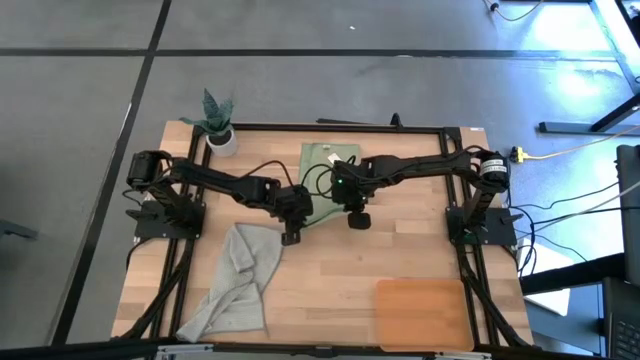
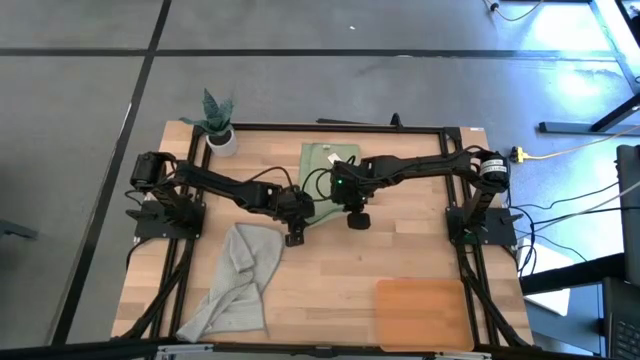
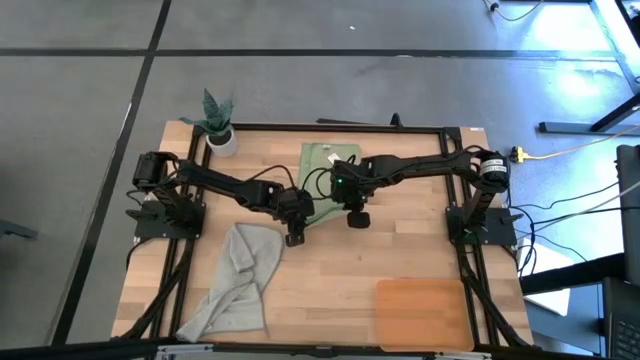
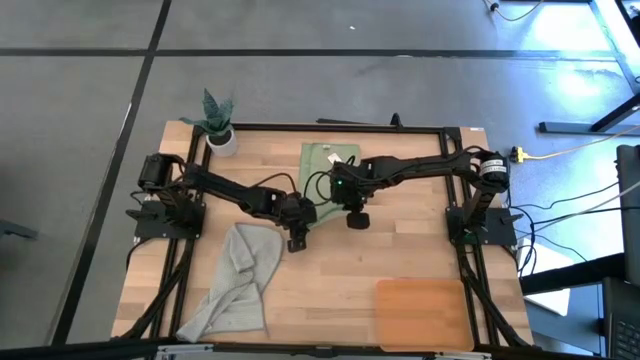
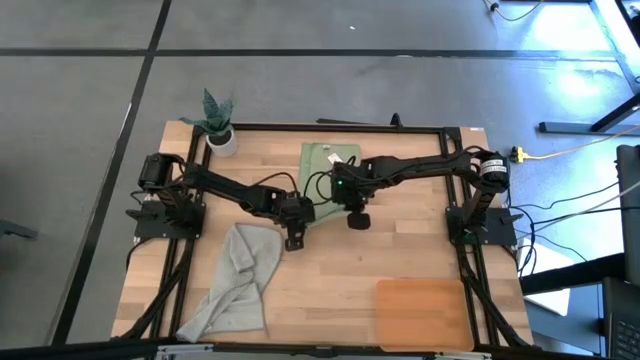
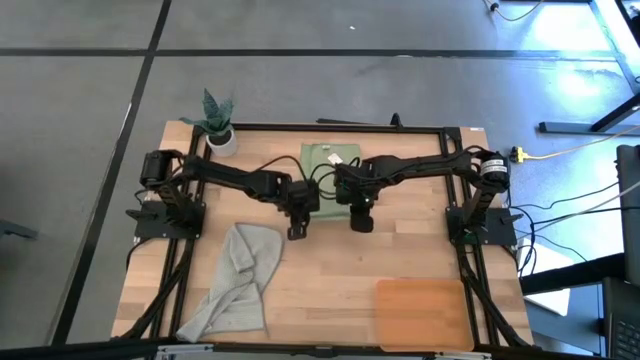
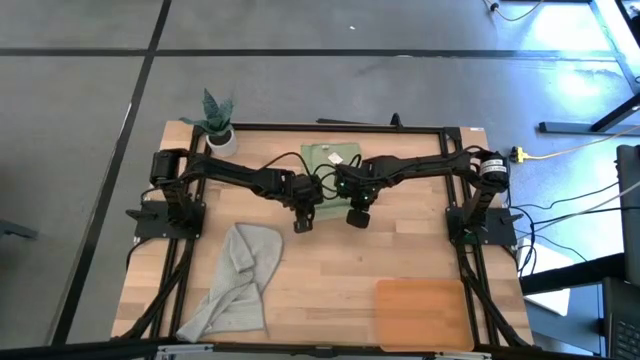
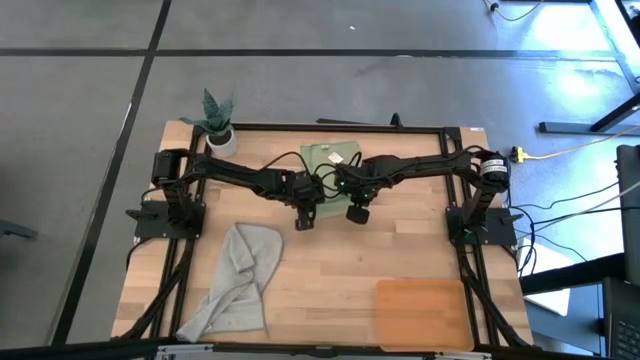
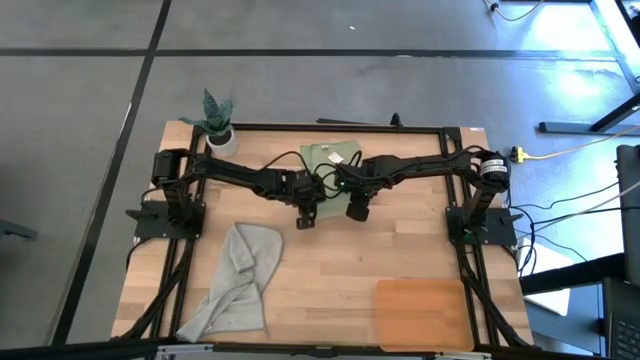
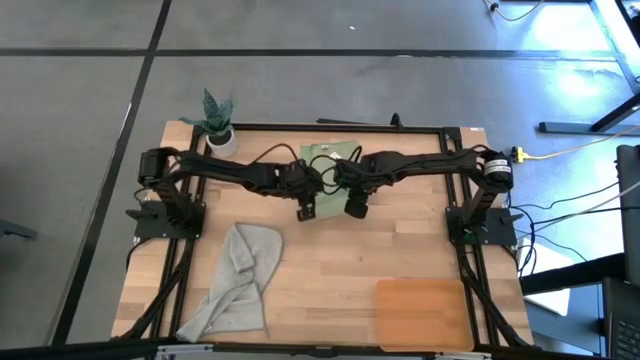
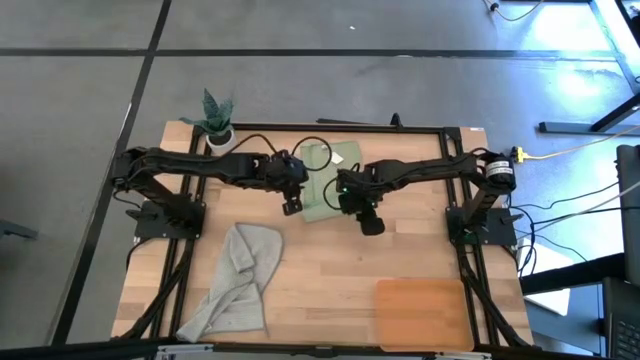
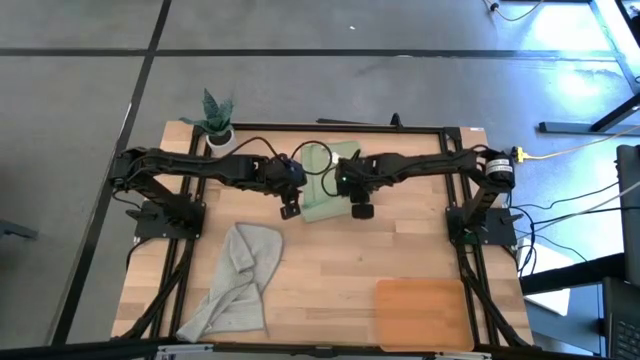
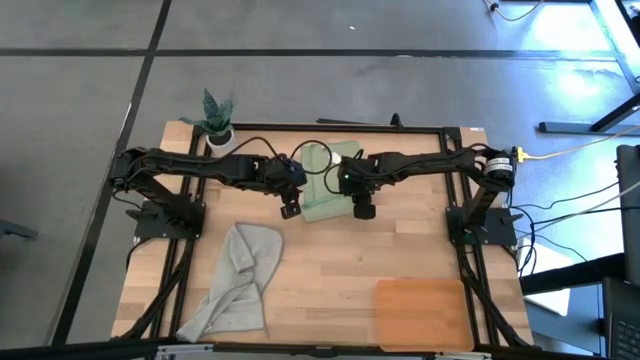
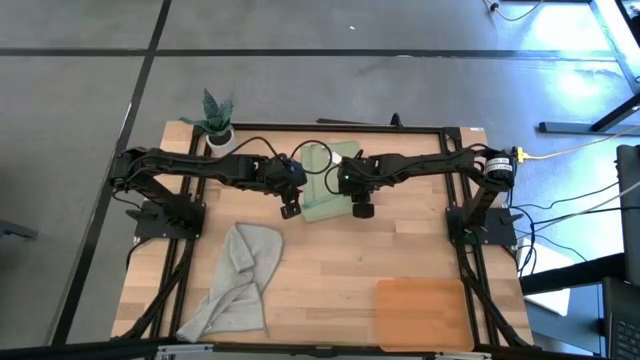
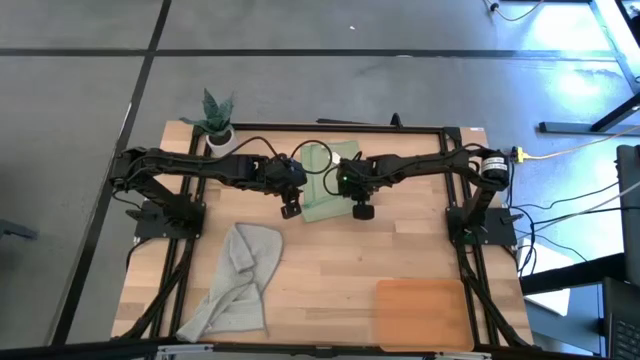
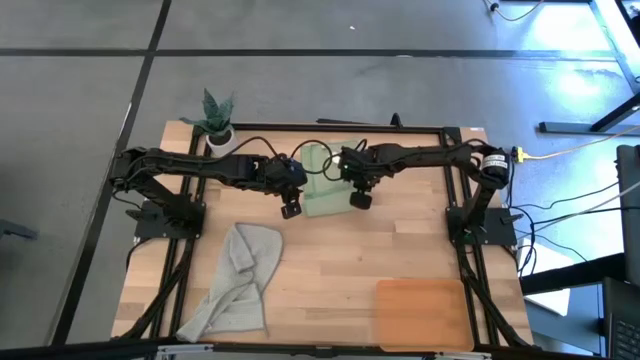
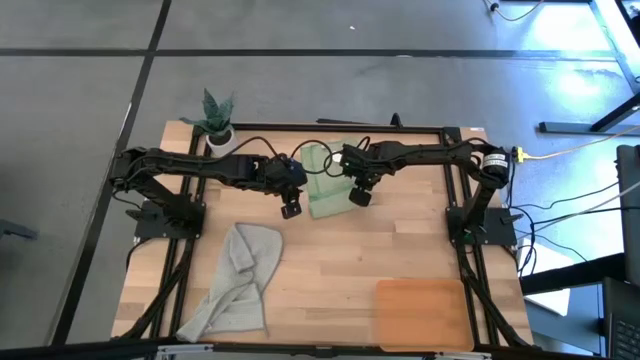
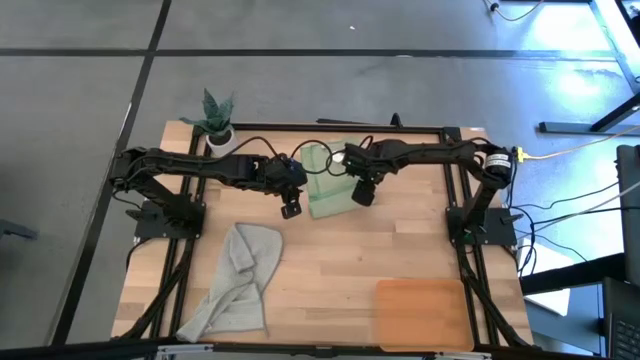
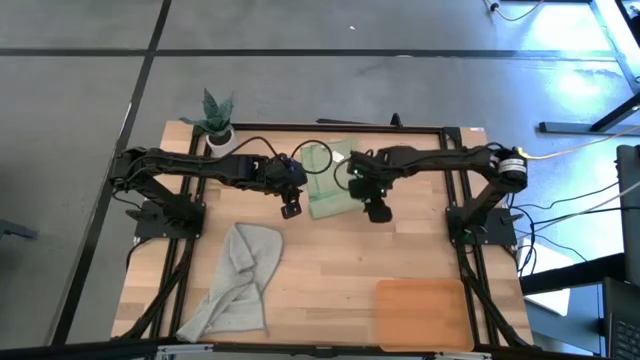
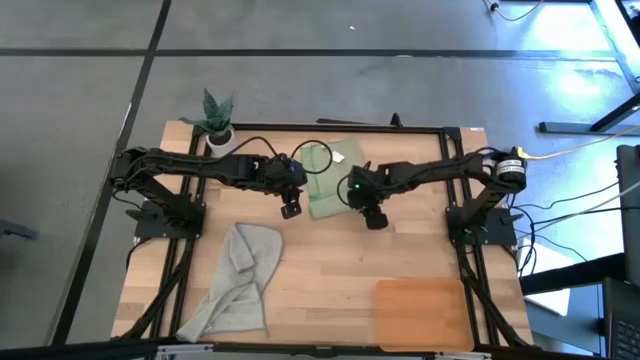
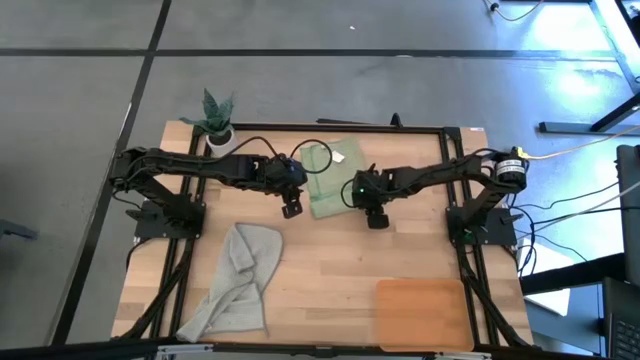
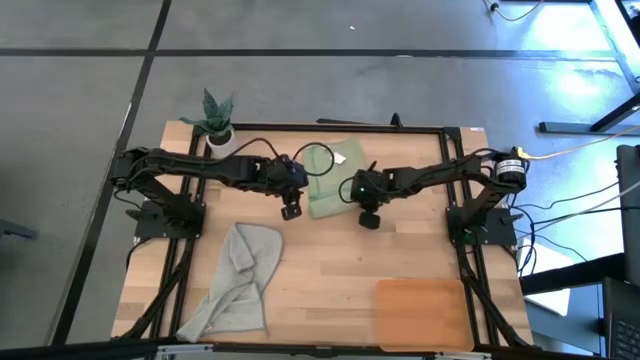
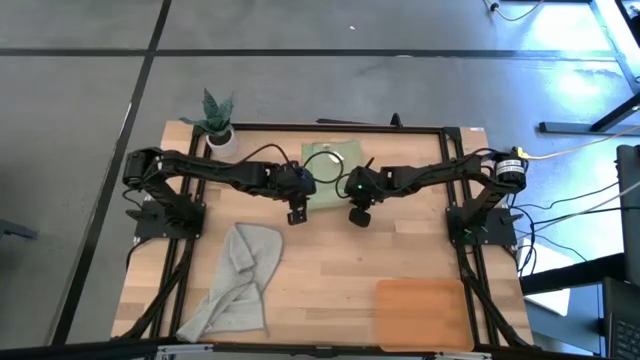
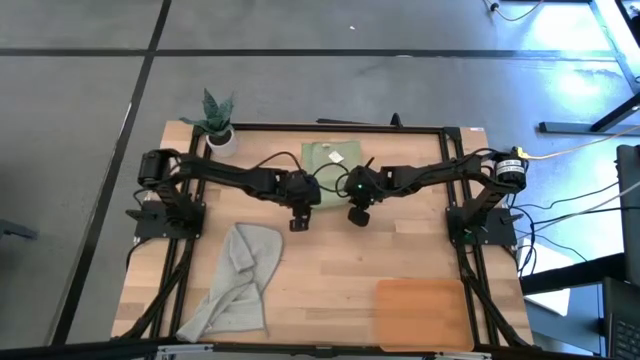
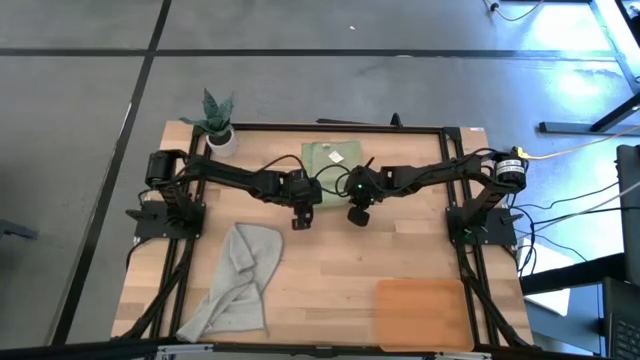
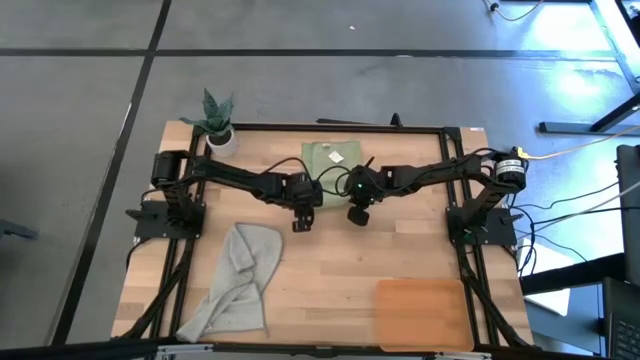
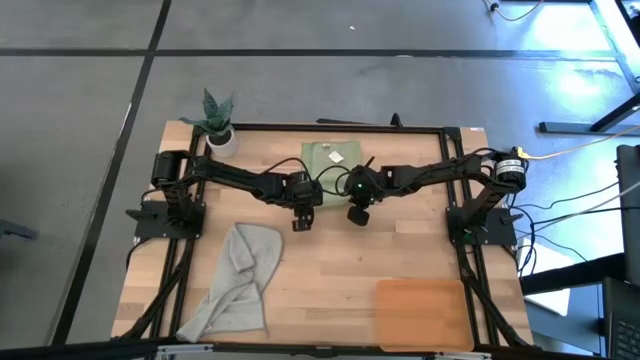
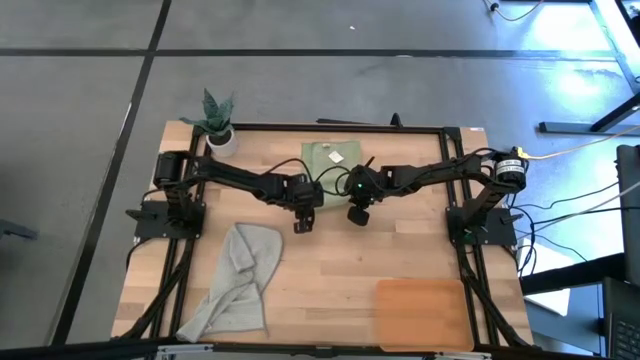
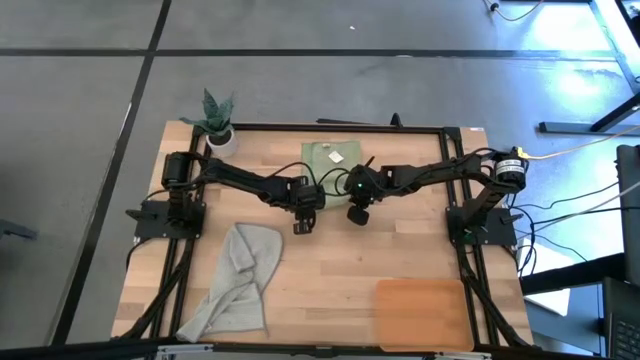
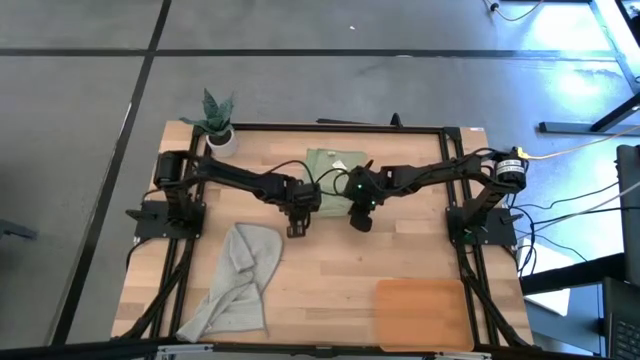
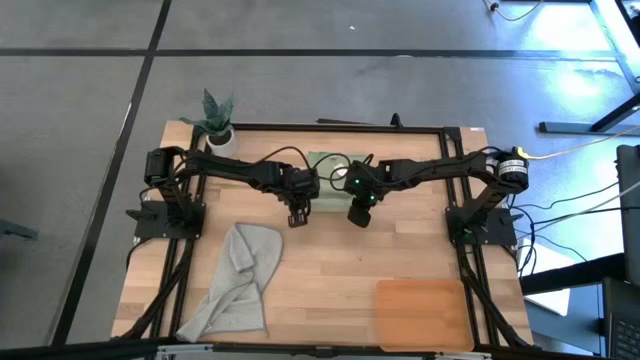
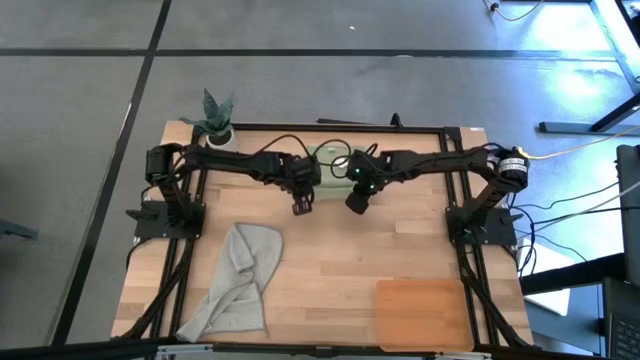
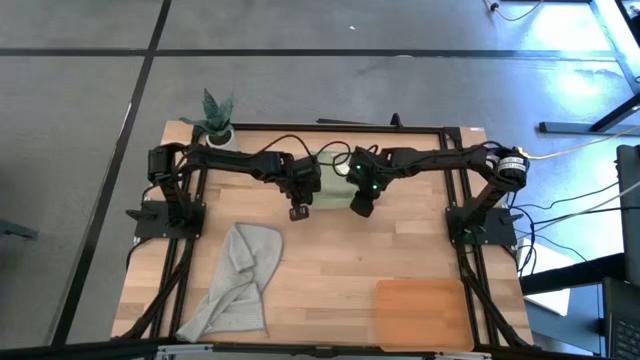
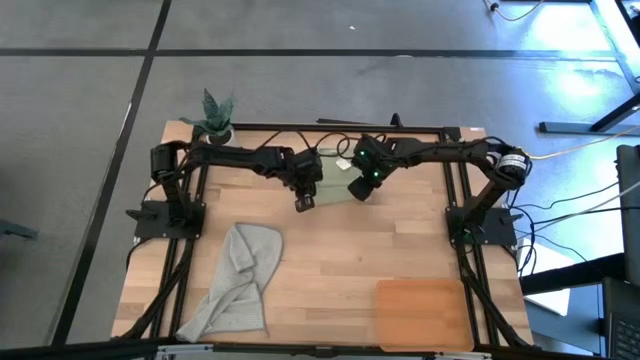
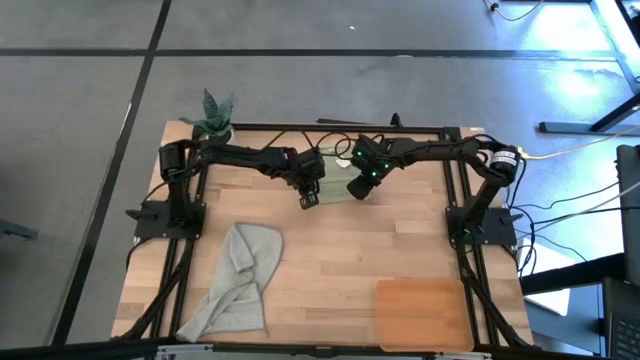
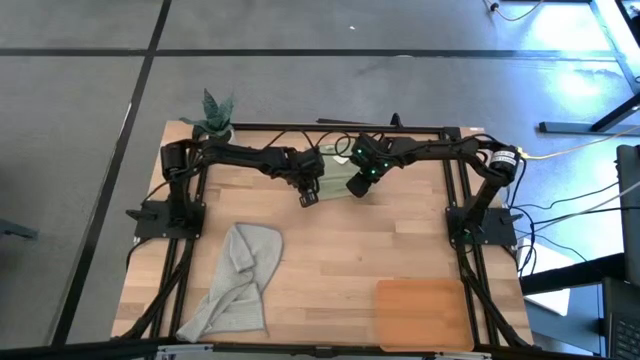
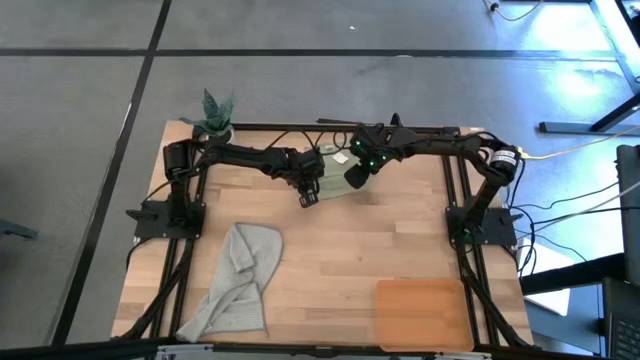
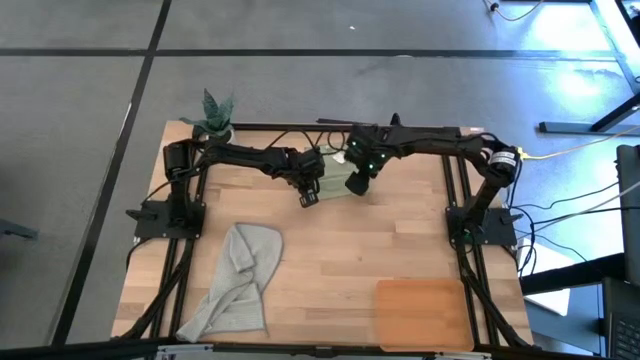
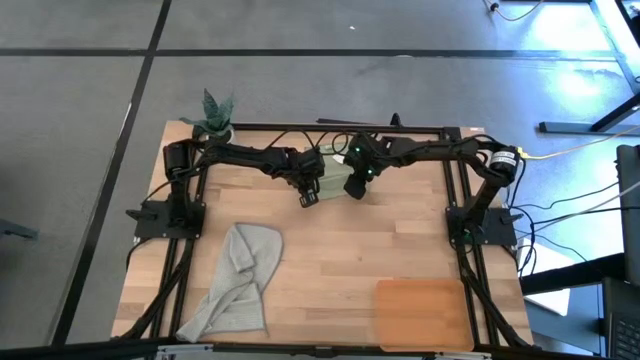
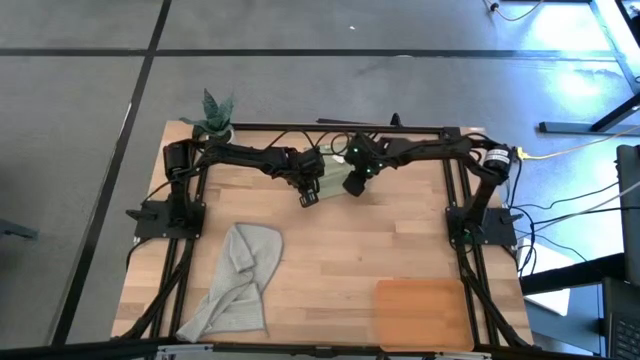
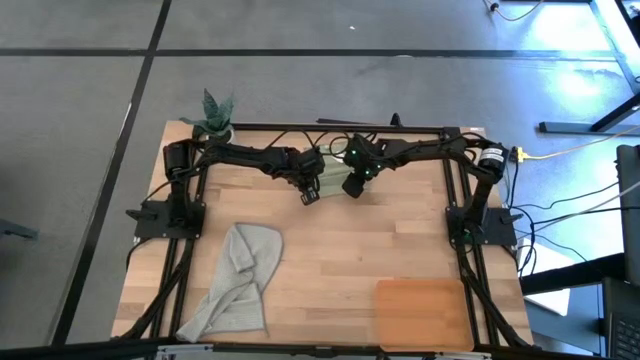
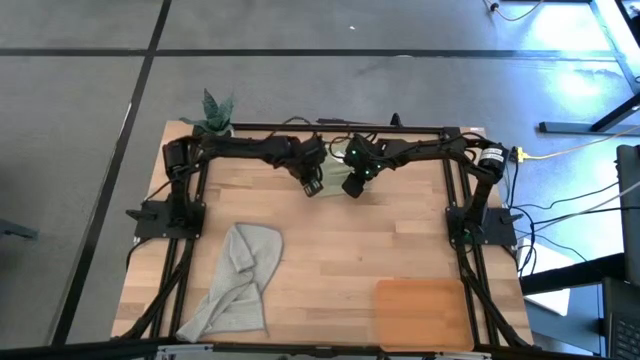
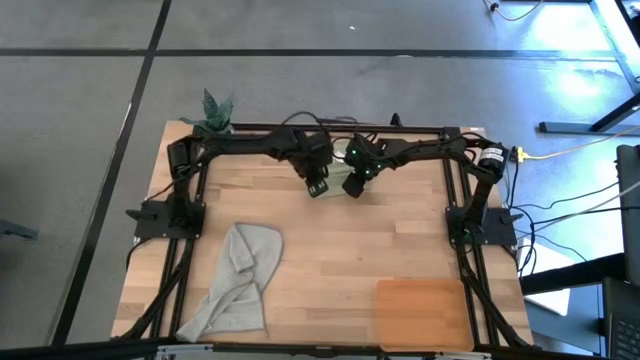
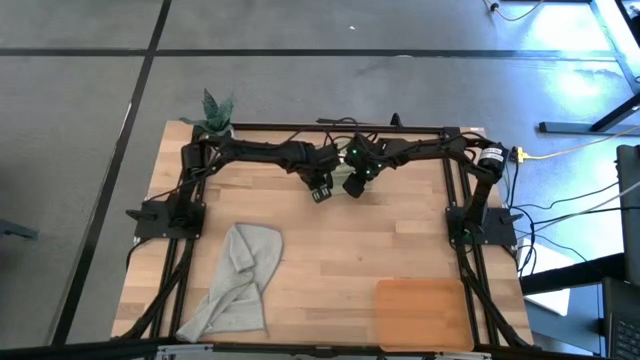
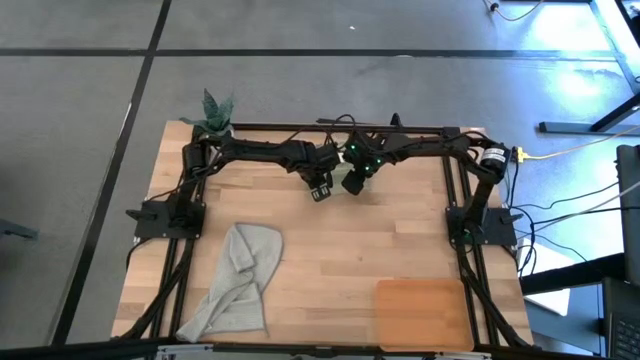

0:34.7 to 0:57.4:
Task: Roll microfiber towels into tight, uniform cylinder then place into a basket
Roll the green microfiber cloth
